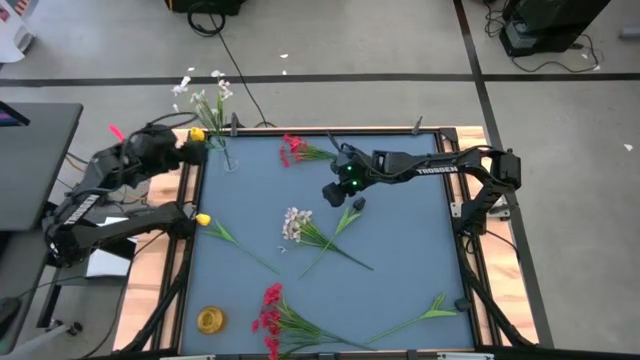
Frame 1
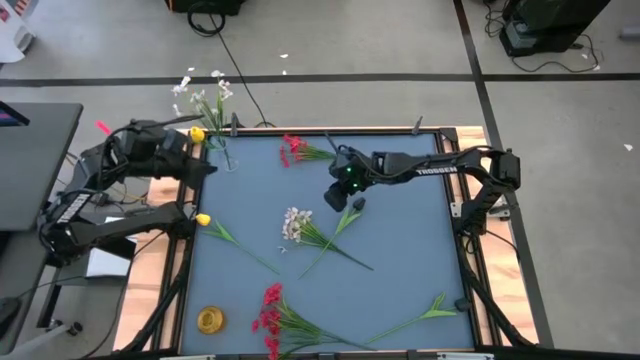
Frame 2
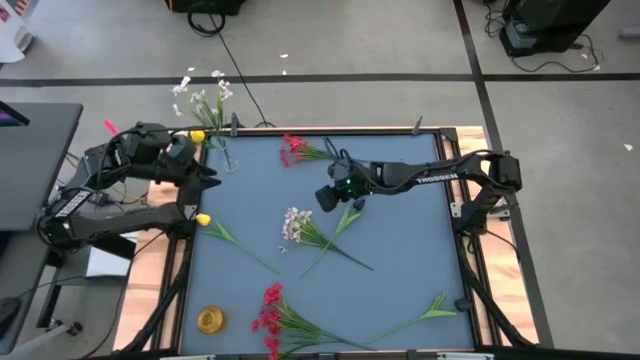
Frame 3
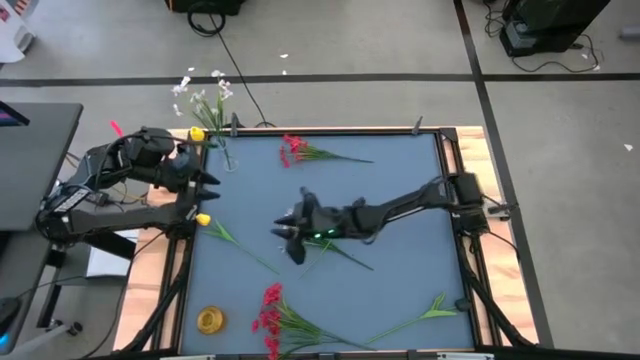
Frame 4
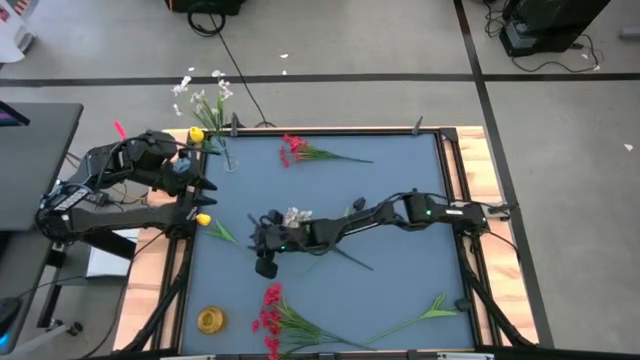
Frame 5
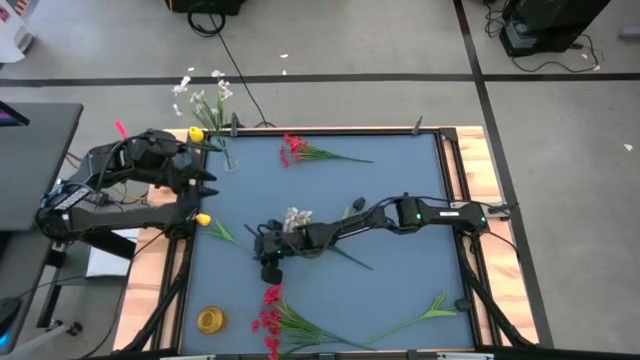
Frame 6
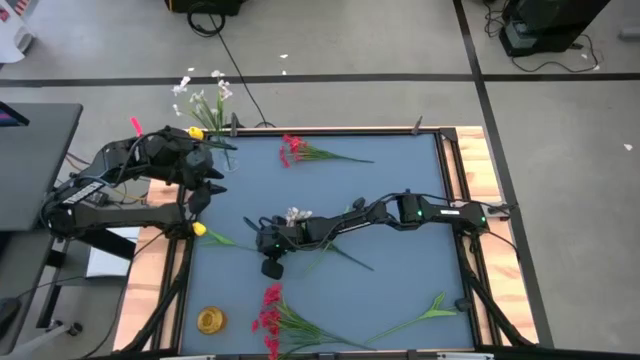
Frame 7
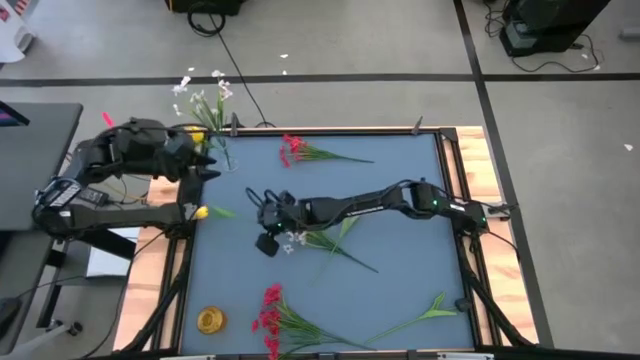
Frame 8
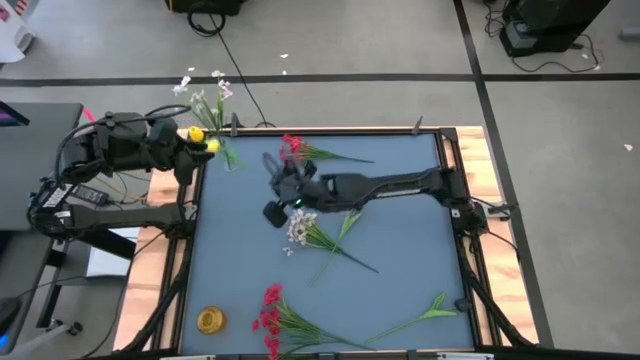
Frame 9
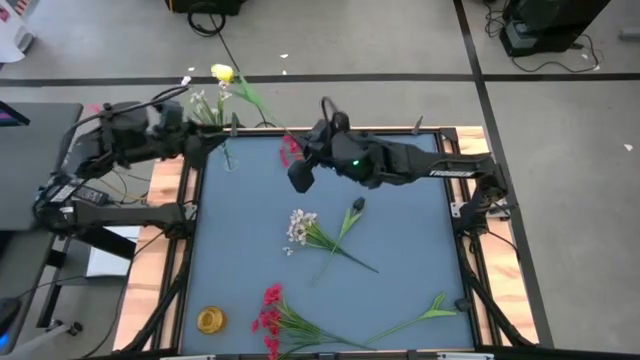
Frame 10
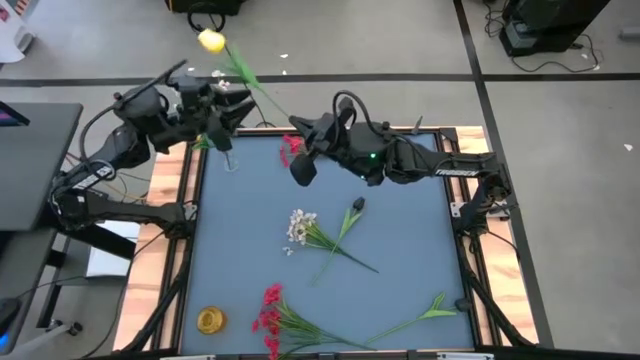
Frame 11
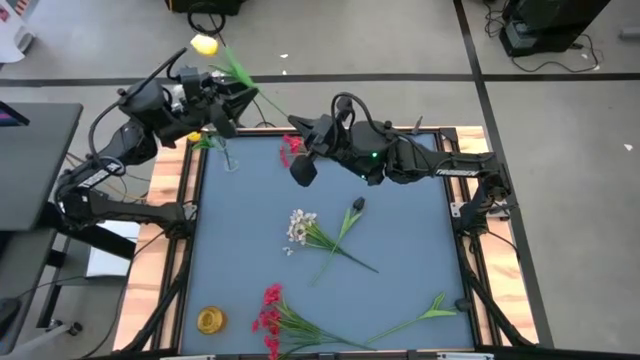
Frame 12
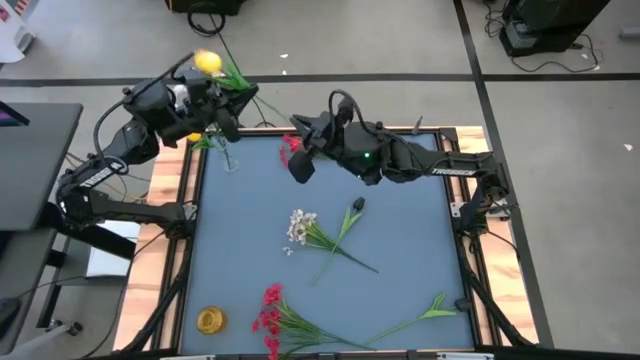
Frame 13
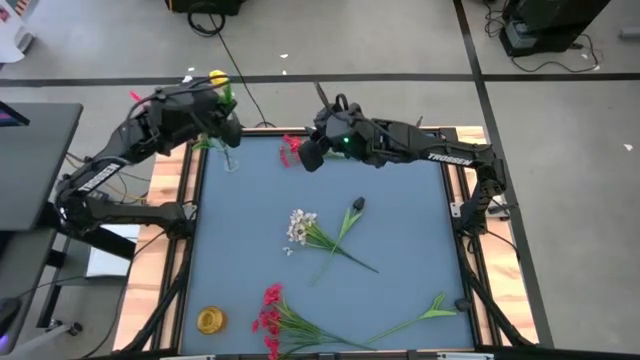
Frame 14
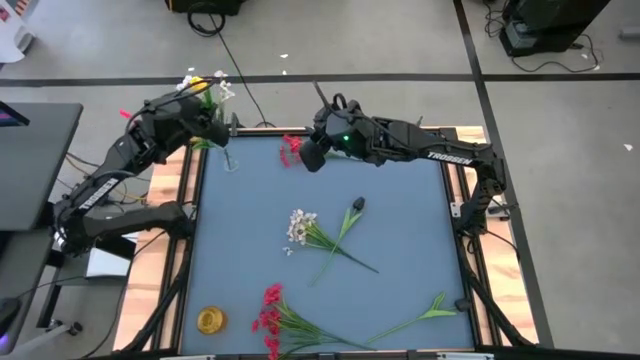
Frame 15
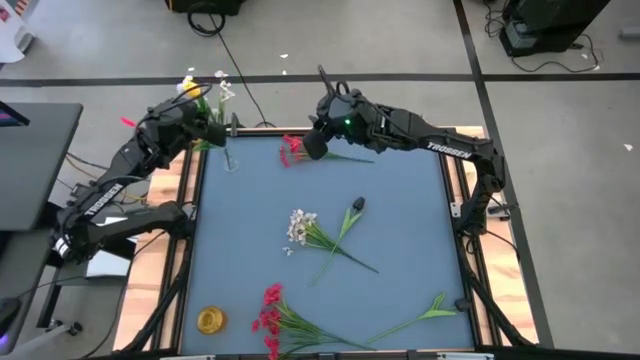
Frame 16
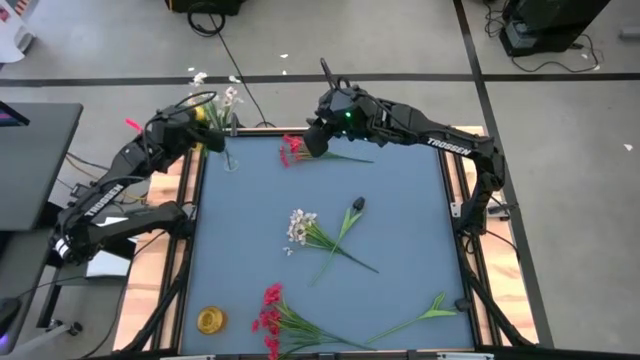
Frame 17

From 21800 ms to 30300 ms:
Task: Sort flowers into vase by color
Put the yellow flower into the transparent vase

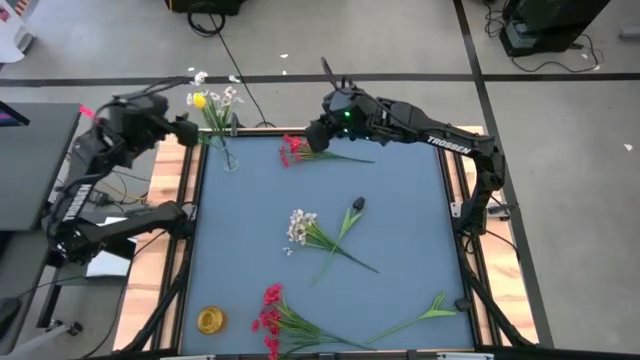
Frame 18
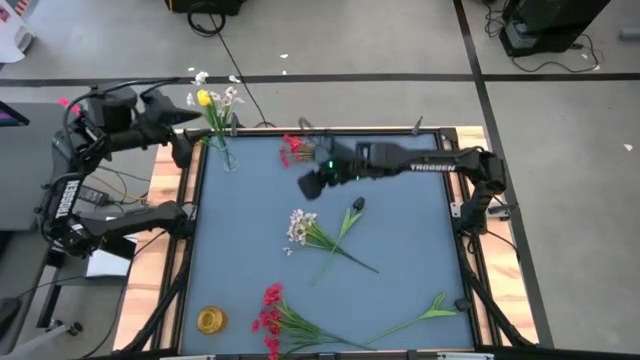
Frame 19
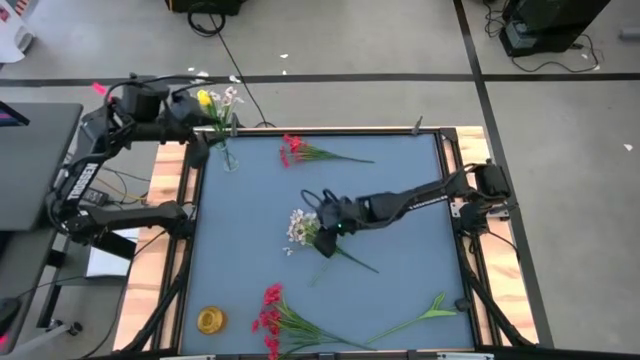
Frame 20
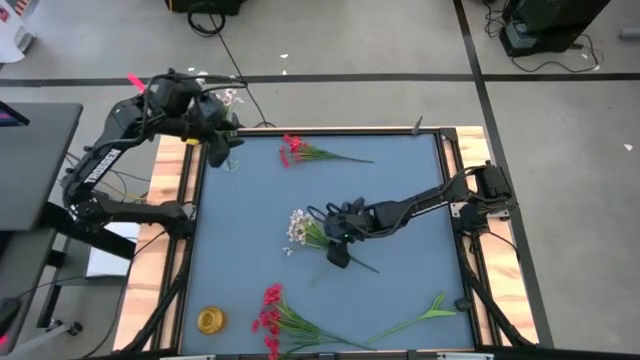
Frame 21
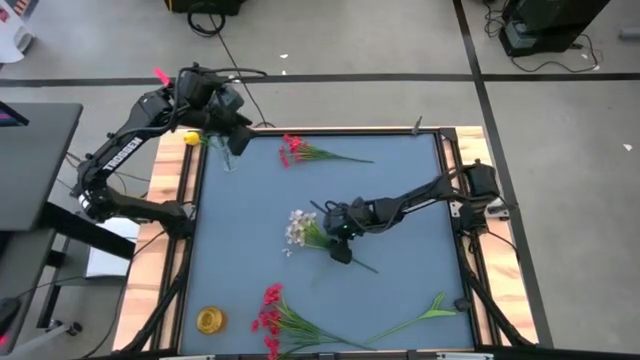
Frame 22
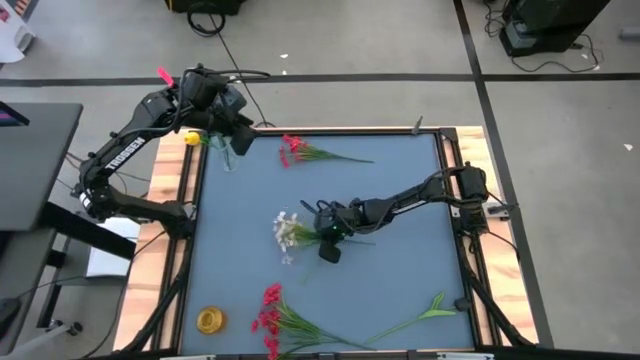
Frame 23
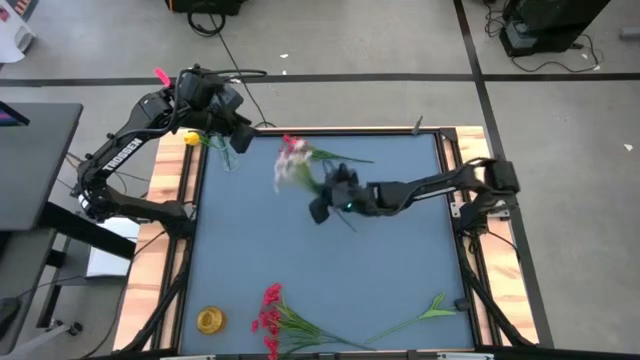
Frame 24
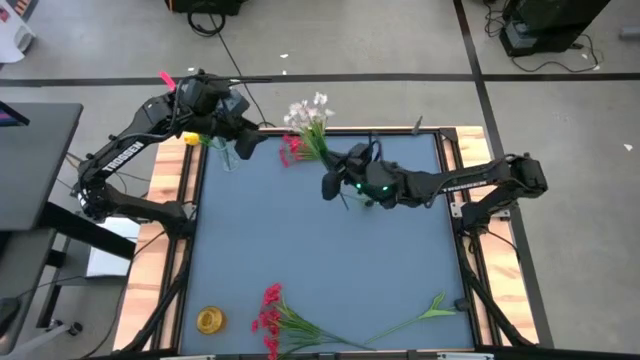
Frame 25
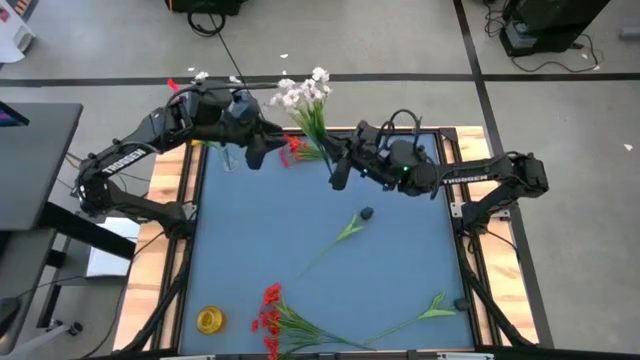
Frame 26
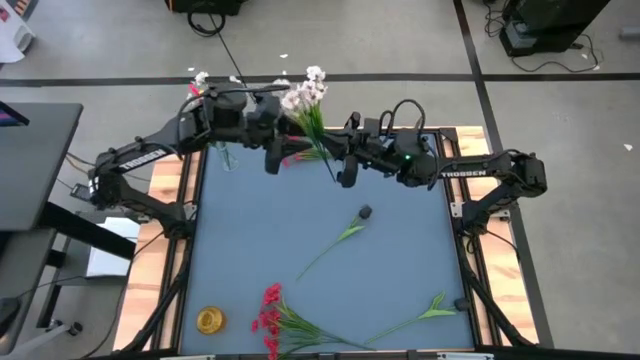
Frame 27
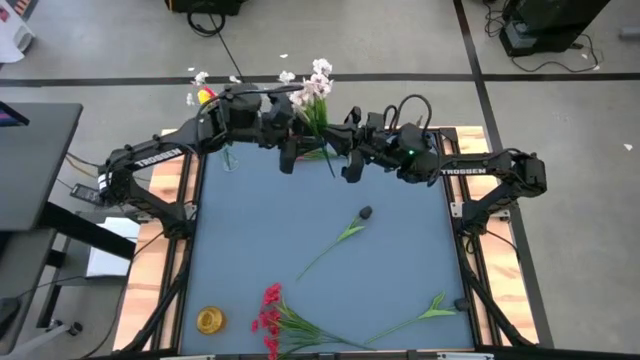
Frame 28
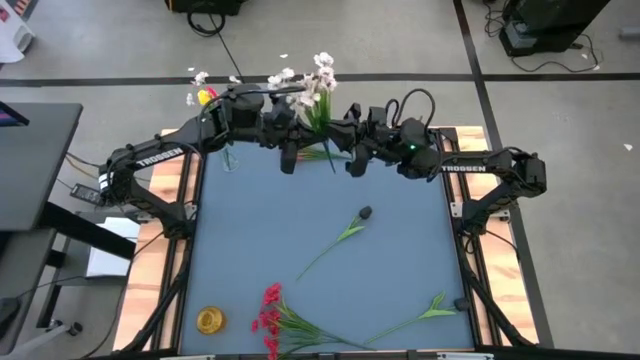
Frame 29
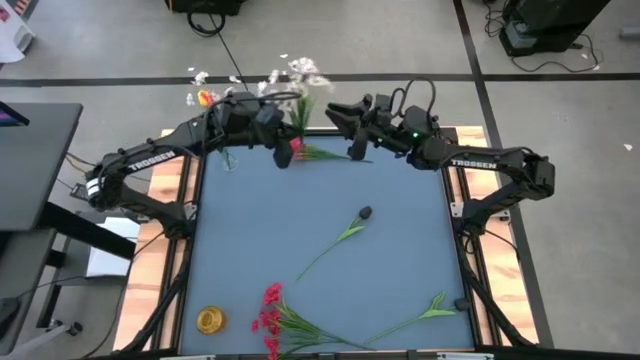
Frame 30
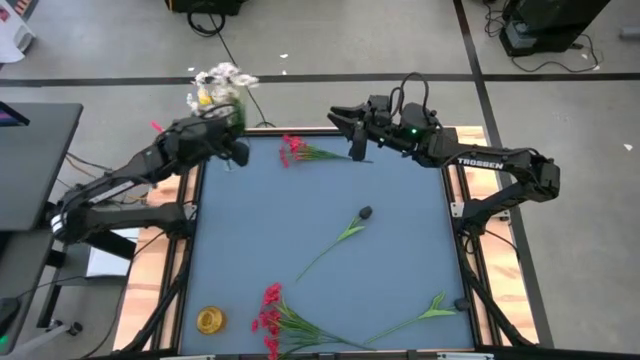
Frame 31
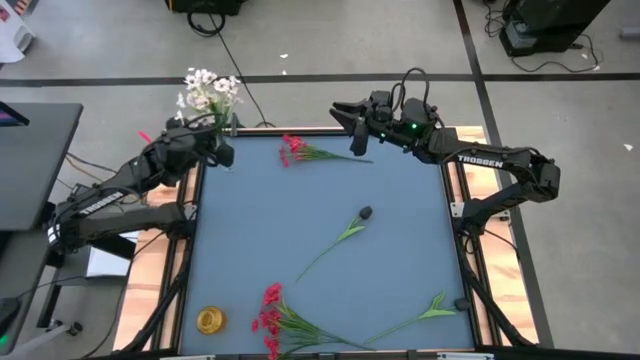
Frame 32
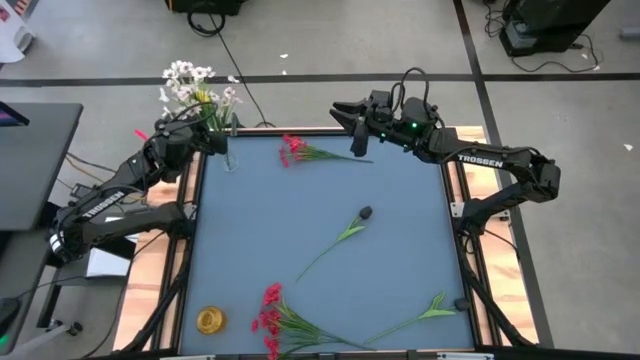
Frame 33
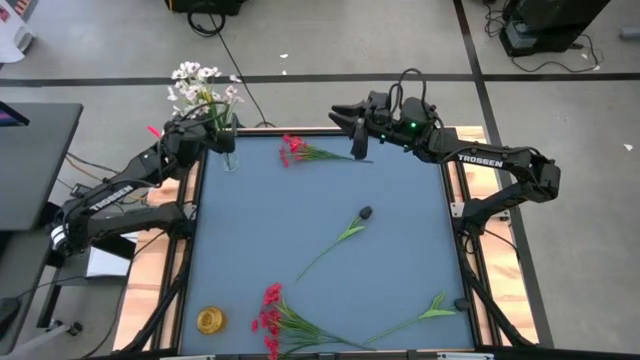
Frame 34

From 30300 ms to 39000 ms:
Put the white flowers into the transparent vase

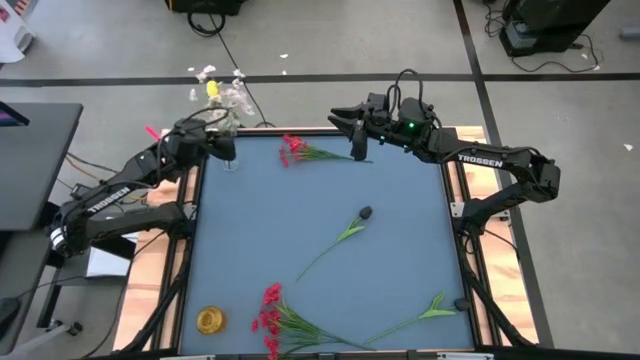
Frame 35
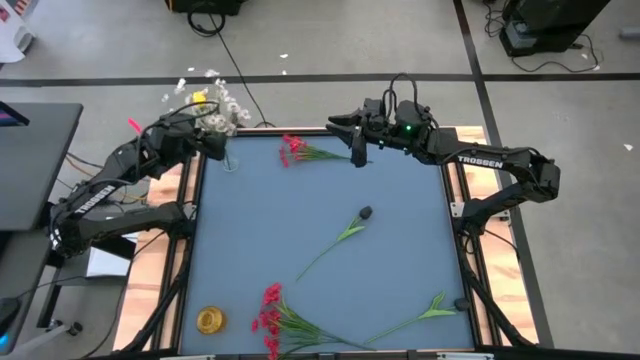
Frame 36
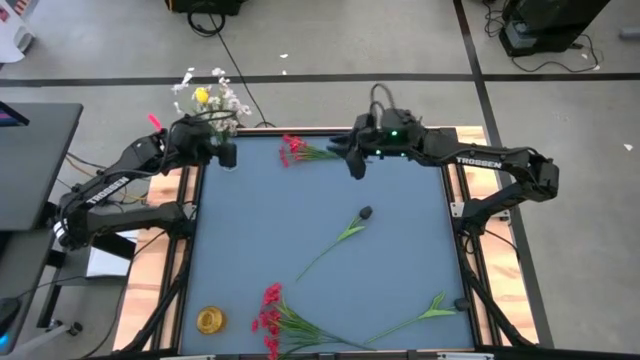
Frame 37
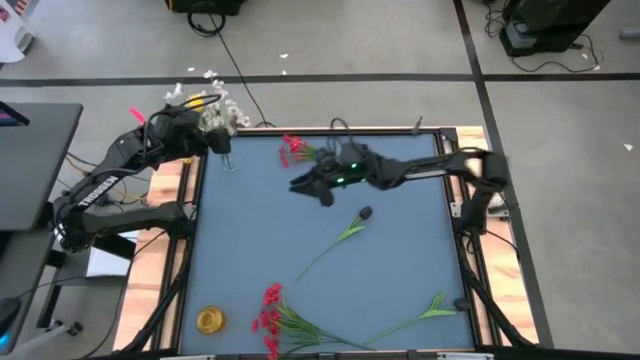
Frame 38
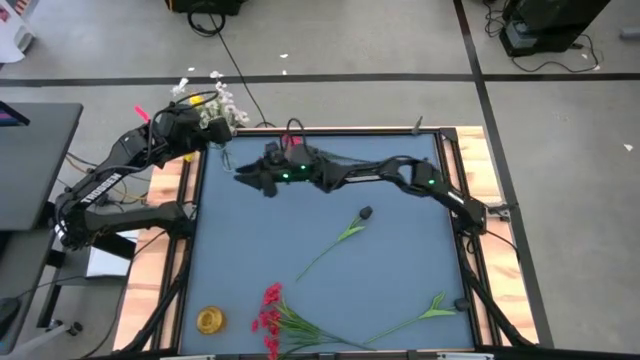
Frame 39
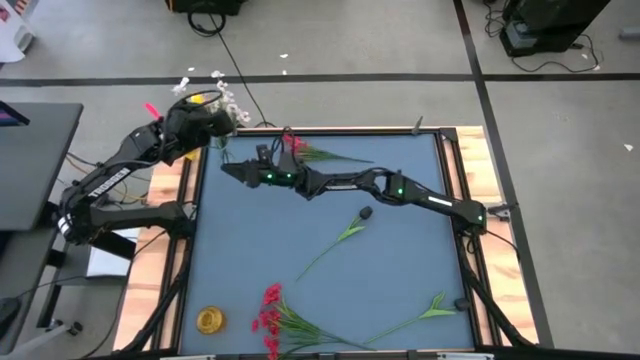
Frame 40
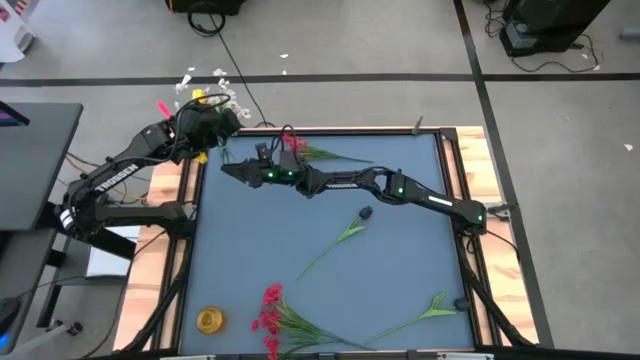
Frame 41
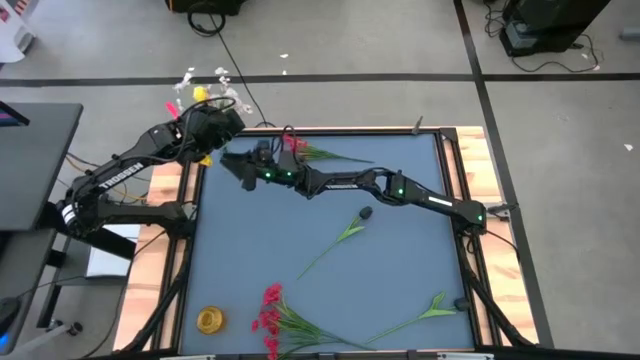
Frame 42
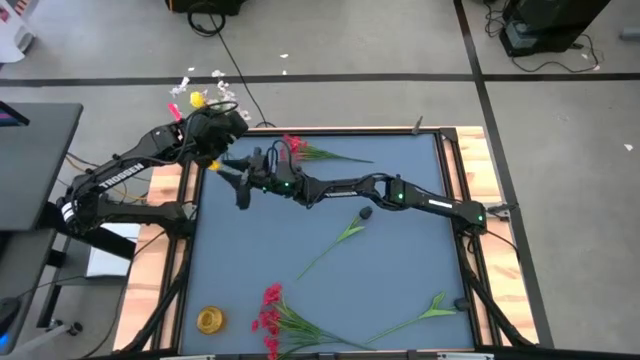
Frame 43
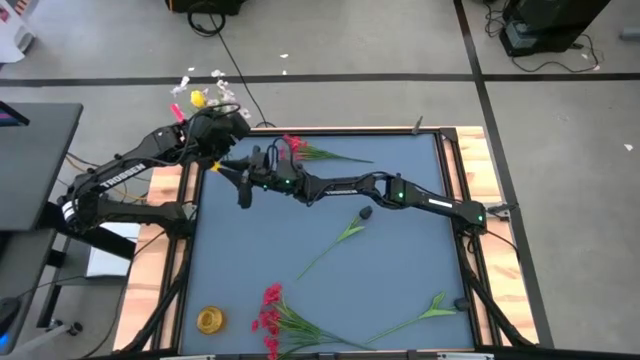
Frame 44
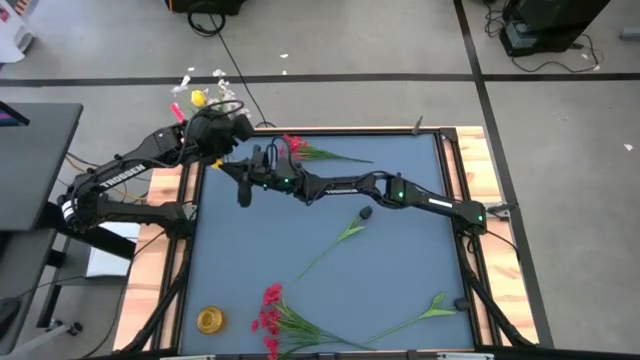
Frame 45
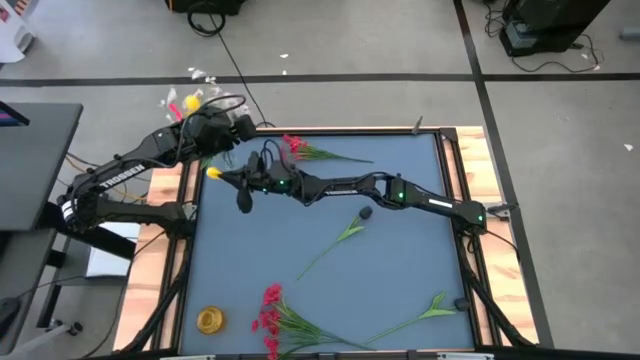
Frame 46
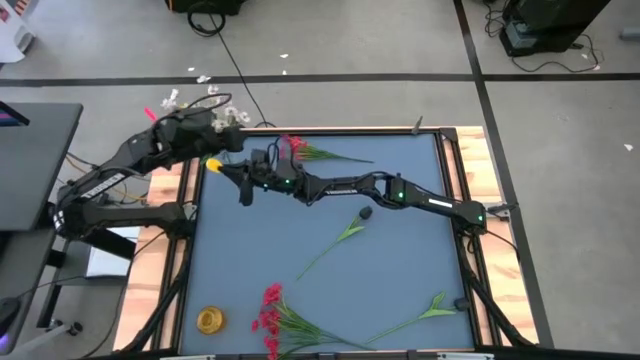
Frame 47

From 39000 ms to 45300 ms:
Adjust the yellow flower in the transparent vase
